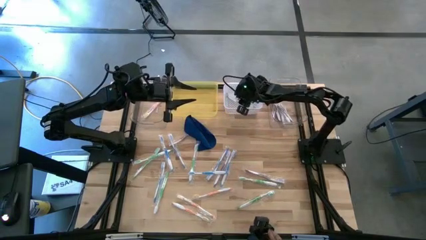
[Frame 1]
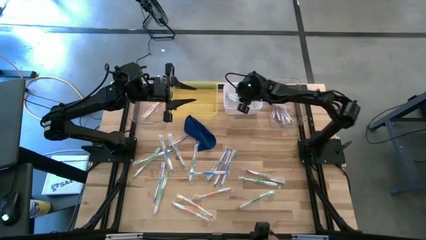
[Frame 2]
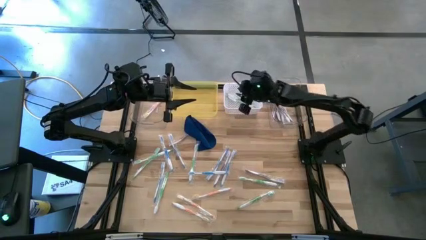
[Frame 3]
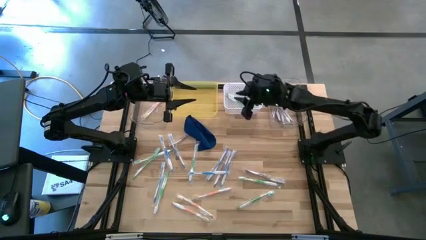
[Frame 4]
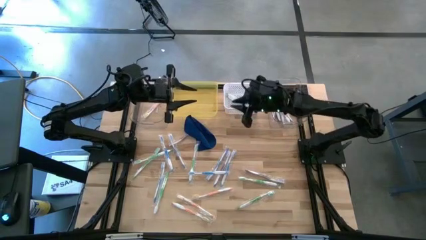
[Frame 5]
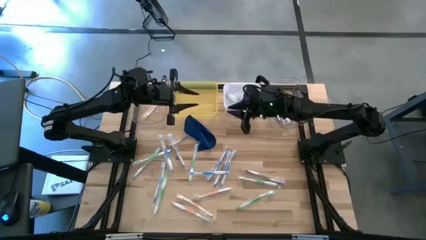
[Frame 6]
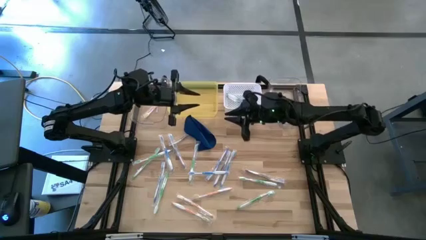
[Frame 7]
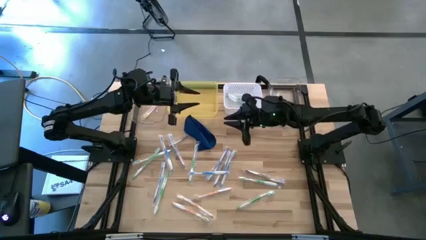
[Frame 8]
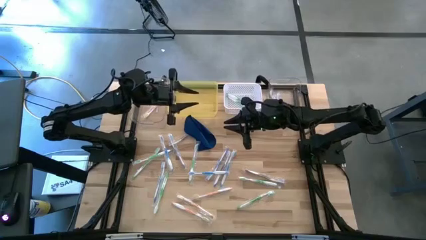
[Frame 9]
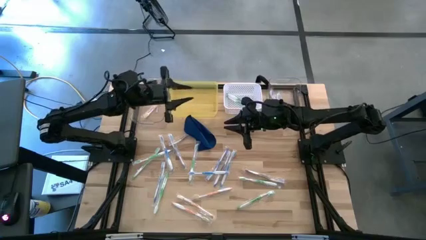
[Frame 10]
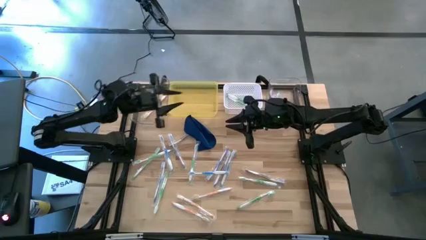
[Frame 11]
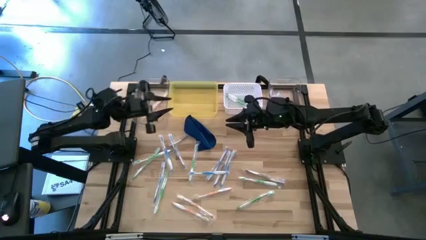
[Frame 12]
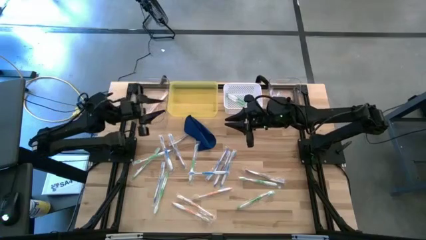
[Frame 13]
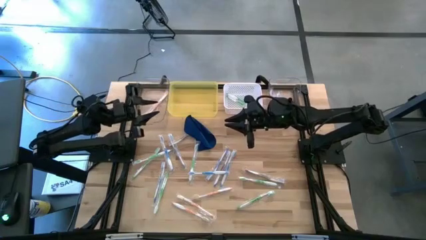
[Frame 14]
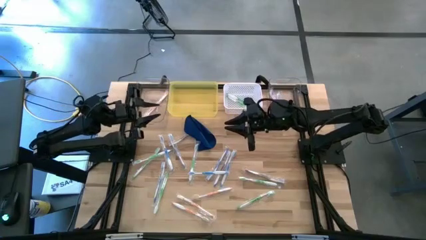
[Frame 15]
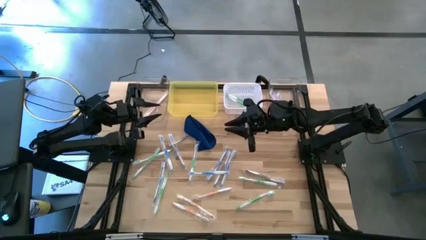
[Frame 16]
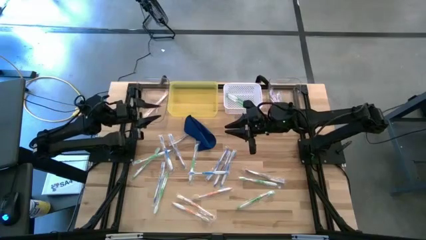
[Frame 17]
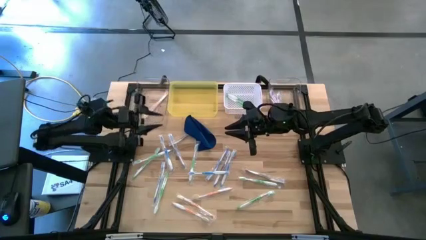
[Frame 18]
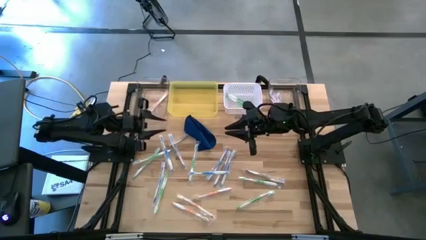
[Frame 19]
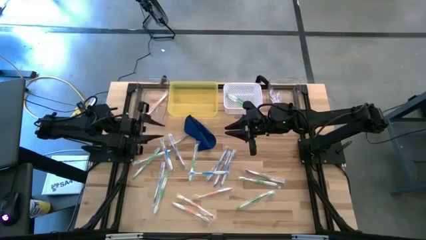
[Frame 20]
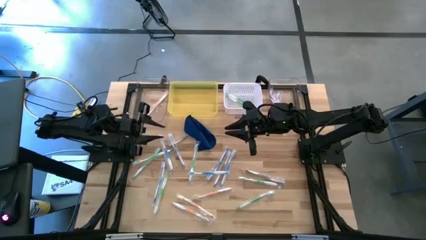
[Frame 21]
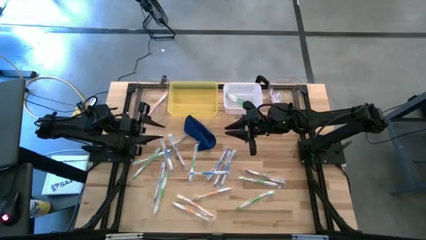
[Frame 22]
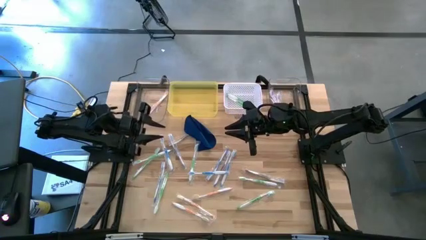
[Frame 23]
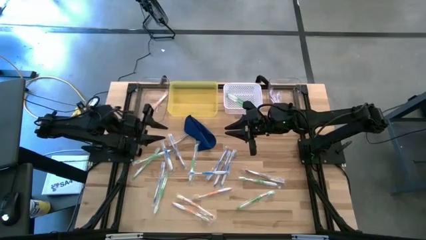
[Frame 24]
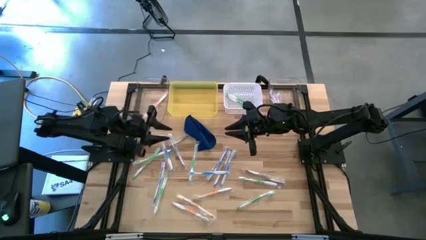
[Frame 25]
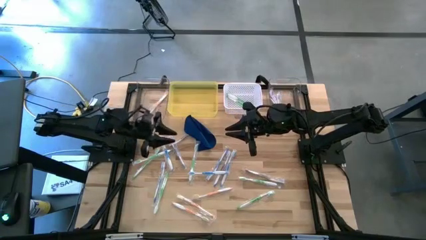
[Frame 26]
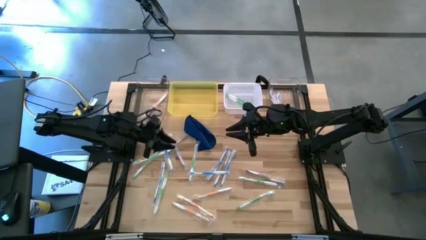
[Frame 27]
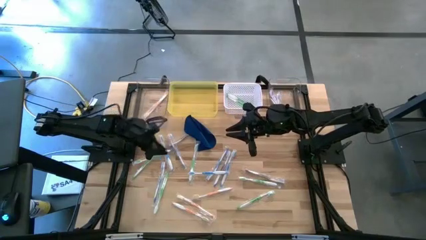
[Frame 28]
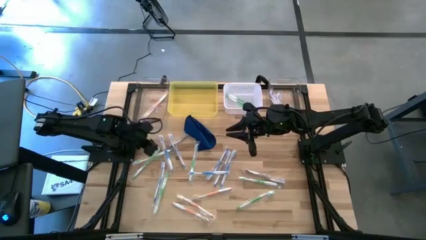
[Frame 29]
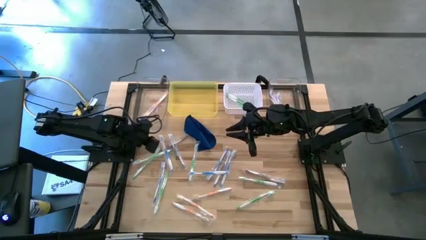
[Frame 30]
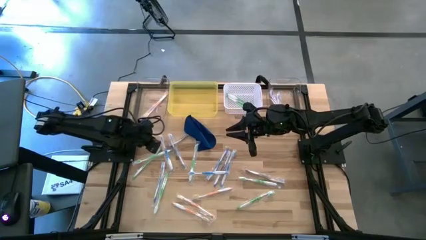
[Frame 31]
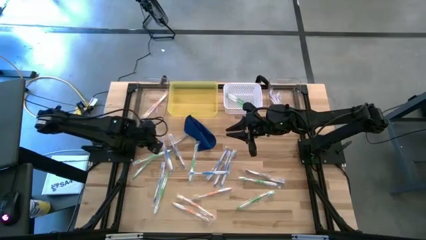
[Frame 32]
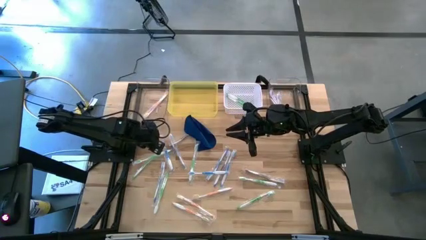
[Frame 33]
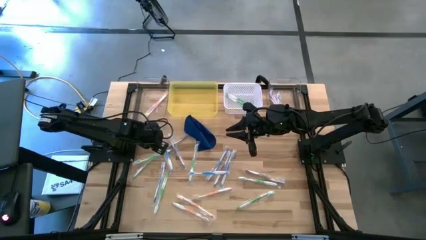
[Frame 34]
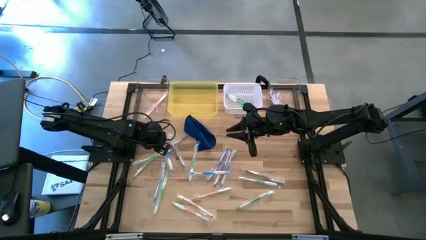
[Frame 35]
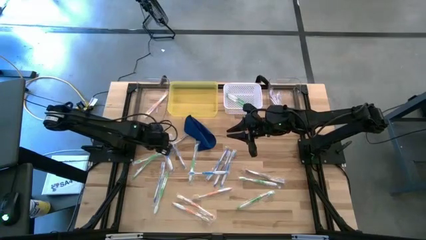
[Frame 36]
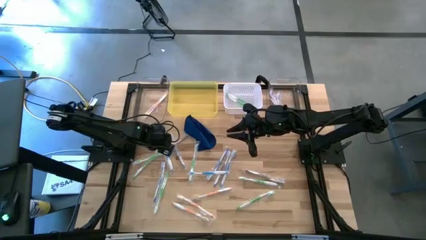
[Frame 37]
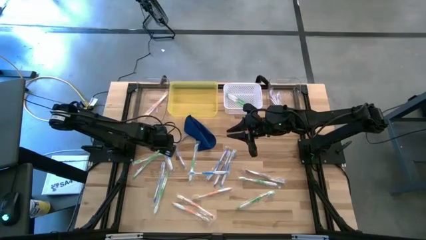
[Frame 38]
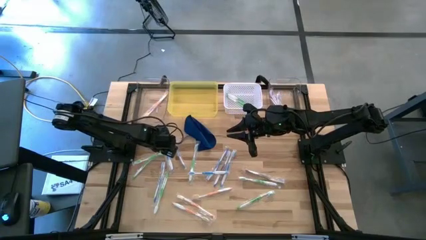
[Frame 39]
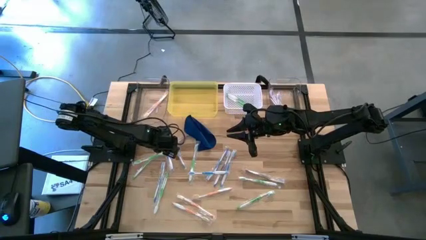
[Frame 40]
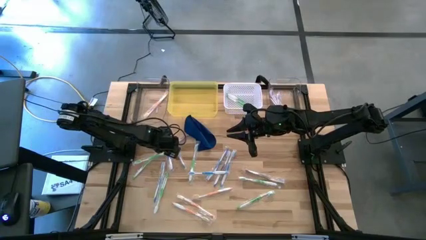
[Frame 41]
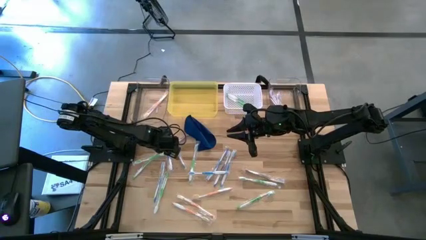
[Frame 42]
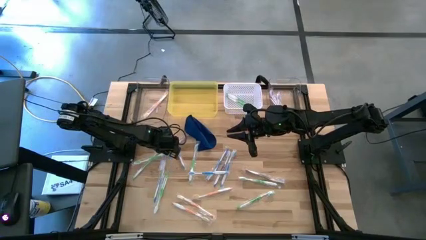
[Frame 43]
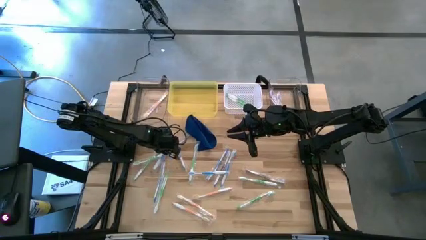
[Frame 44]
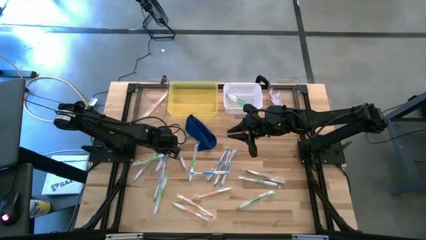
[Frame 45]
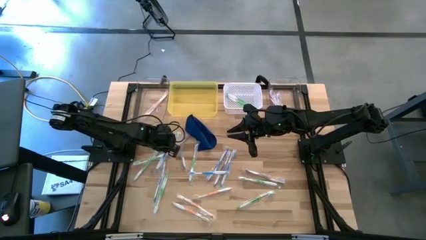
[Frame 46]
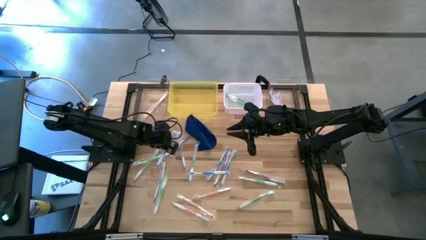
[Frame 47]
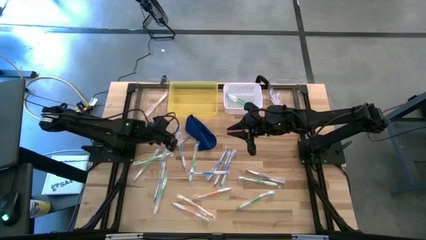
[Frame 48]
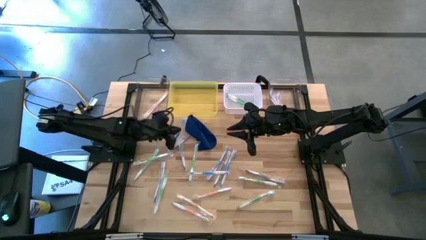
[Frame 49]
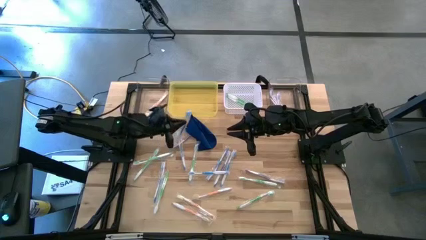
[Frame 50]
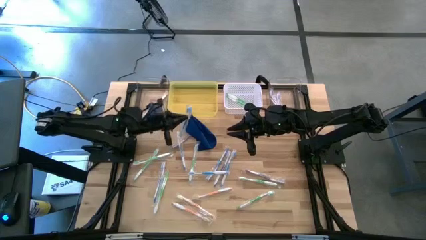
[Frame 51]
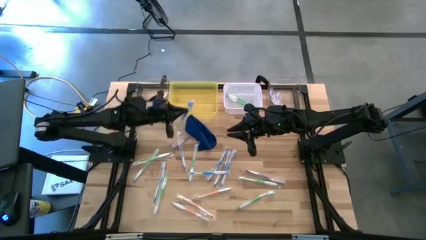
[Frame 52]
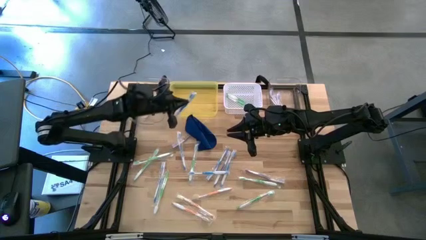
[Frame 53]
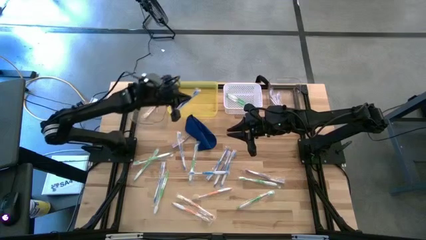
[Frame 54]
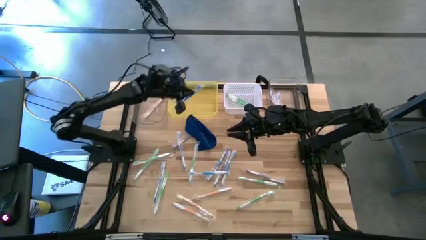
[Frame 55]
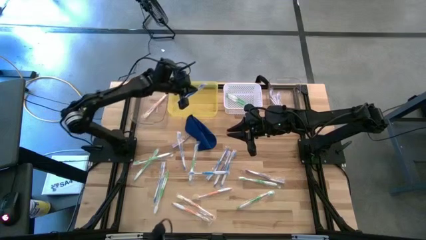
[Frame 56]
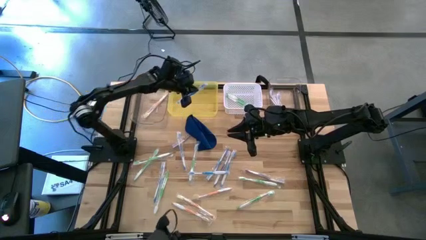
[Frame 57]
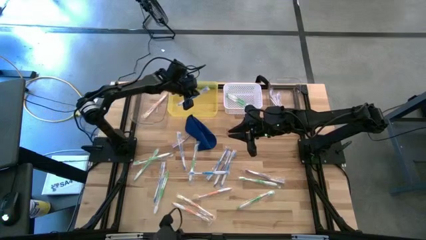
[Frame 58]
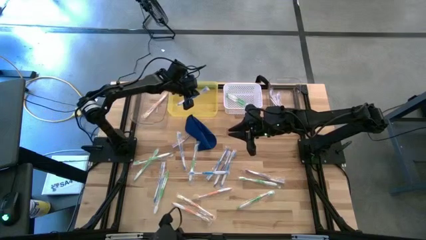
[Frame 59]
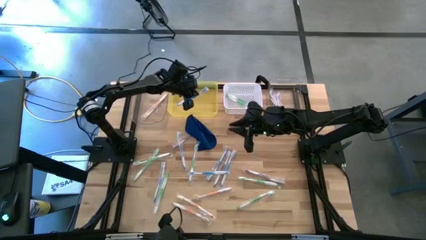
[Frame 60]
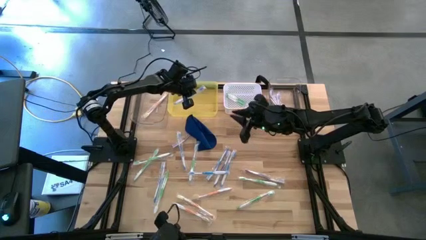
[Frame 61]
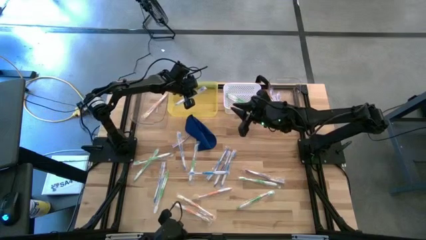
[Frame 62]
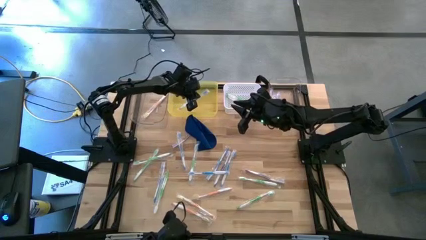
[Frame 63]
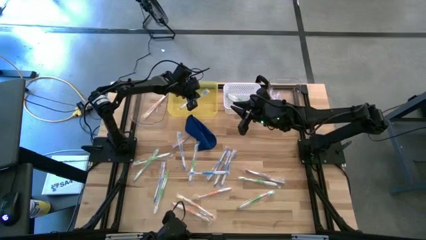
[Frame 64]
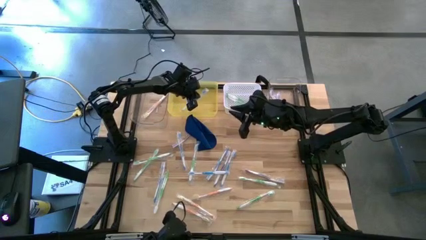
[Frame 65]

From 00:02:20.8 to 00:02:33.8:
Task: Pick & Place Toothbrushes
Put the blue toothbrush into the yellow bin

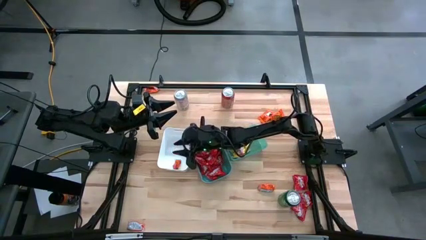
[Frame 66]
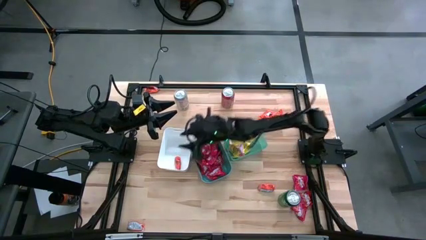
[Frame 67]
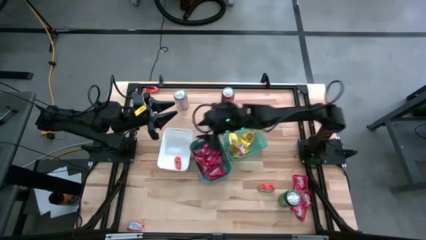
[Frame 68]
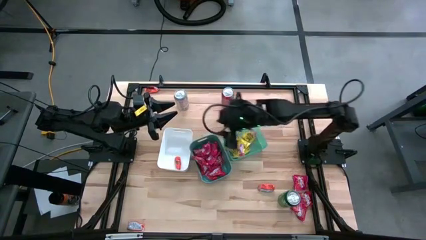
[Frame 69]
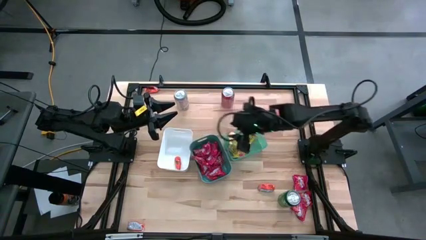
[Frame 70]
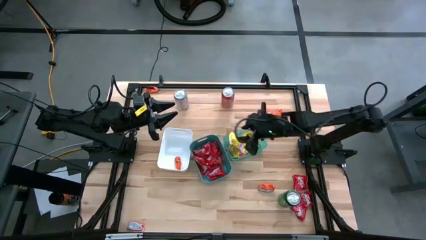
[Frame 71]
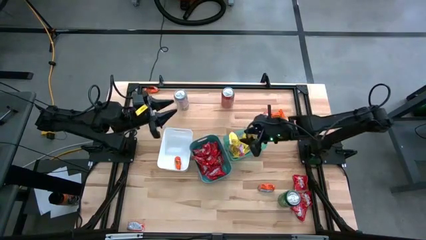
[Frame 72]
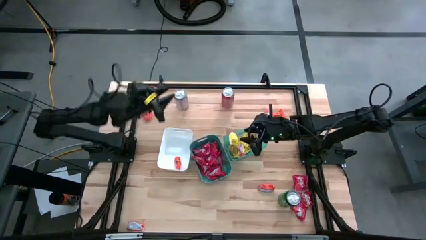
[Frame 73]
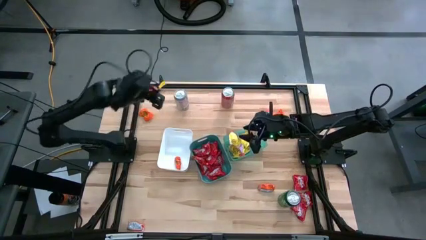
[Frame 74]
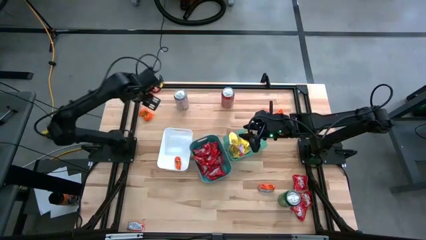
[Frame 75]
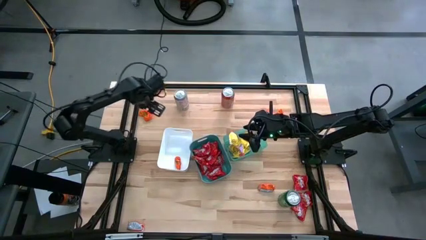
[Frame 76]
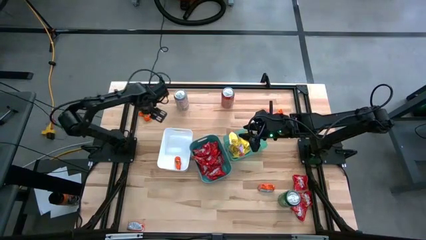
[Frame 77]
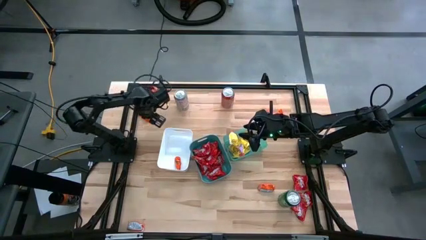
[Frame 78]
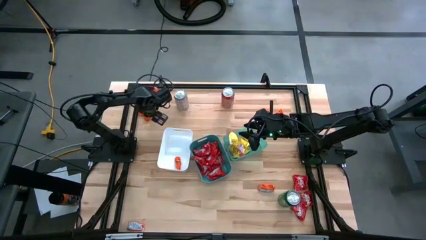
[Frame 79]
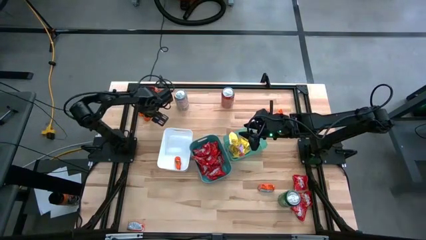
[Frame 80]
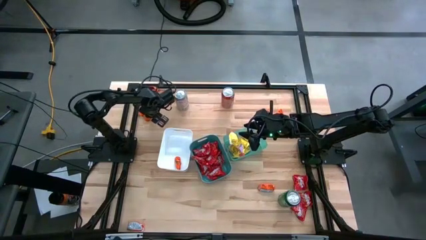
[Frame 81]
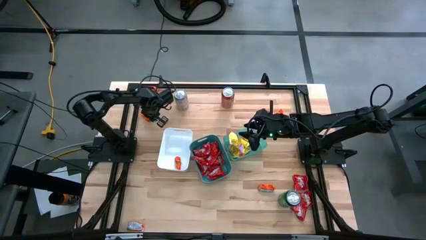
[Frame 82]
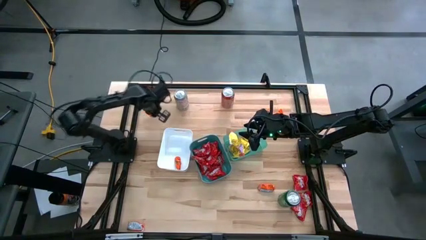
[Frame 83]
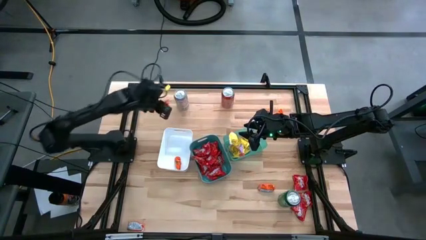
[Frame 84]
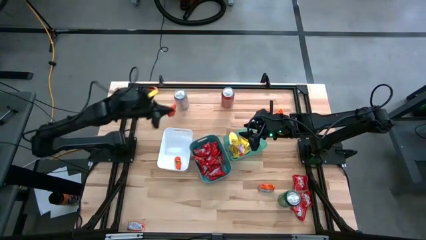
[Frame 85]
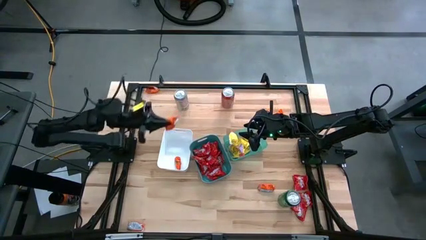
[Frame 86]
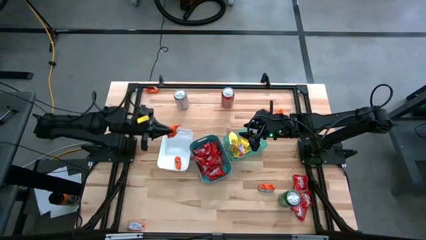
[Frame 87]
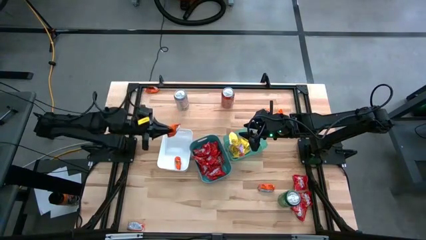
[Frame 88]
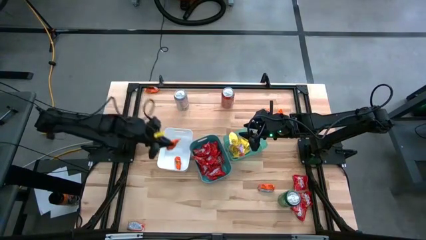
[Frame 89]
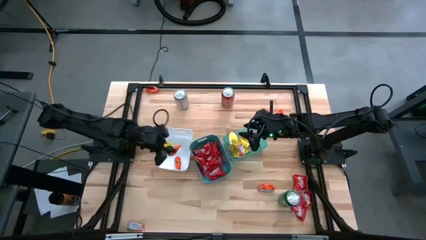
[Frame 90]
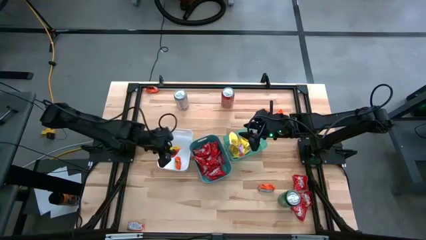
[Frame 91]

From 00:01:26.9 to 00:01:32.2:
Task: Sort candy
Put the orange chocolate into the white bin
